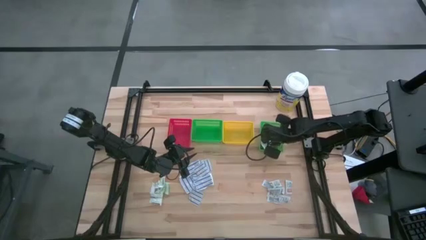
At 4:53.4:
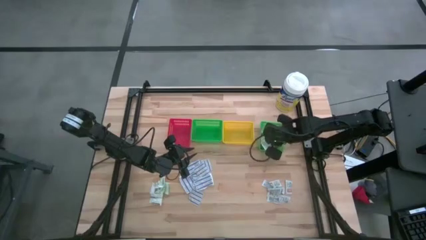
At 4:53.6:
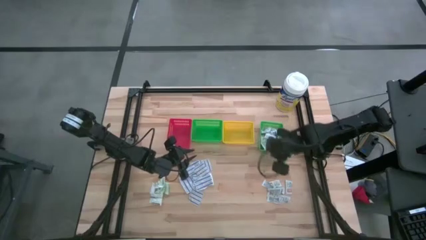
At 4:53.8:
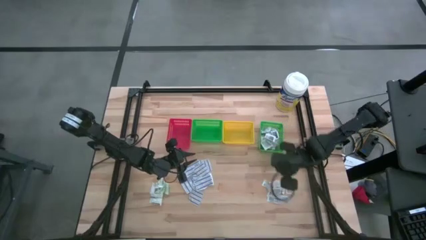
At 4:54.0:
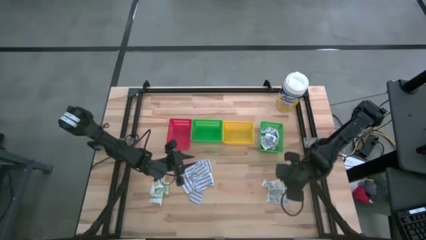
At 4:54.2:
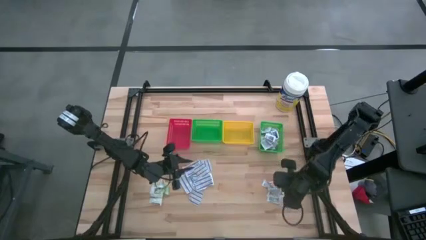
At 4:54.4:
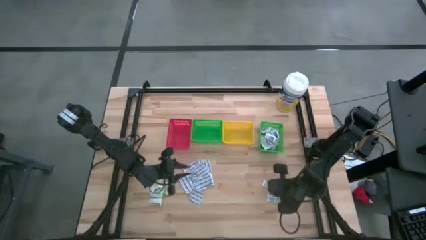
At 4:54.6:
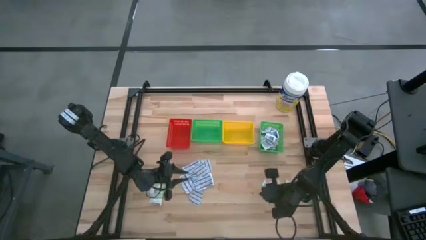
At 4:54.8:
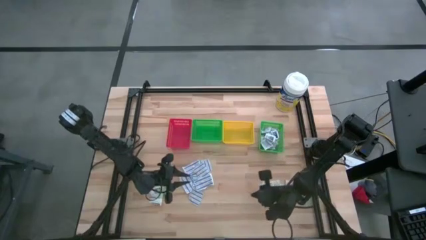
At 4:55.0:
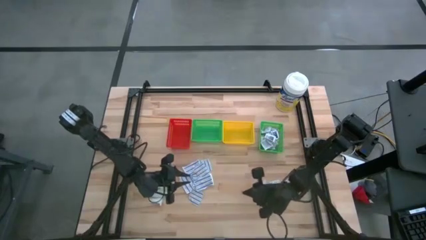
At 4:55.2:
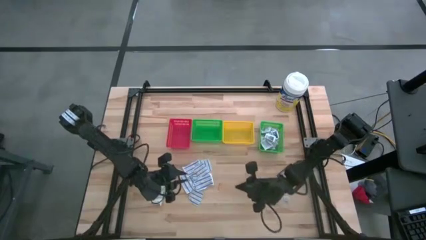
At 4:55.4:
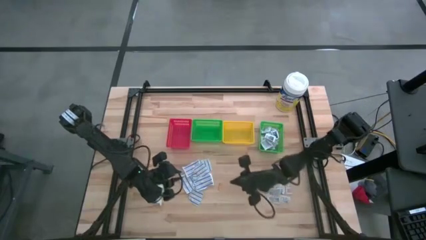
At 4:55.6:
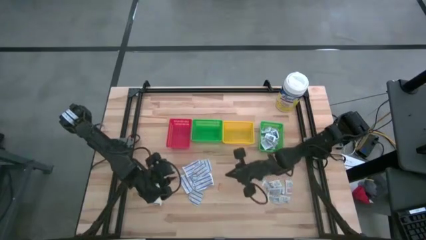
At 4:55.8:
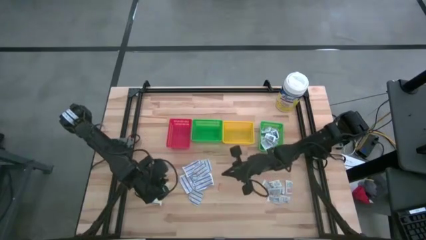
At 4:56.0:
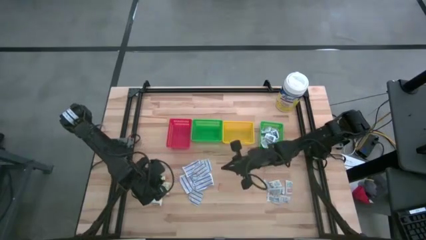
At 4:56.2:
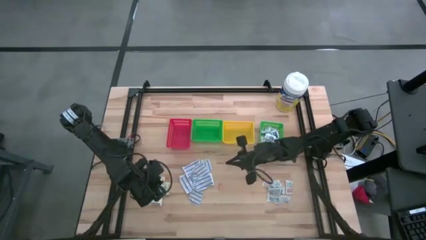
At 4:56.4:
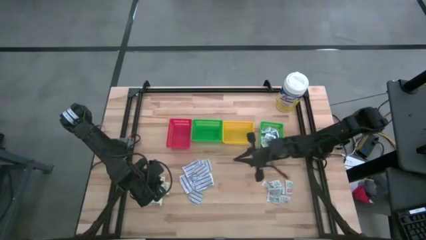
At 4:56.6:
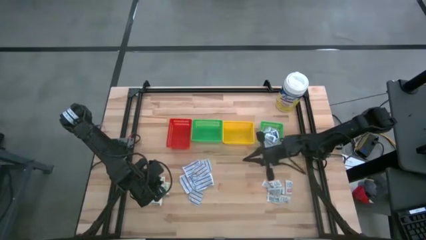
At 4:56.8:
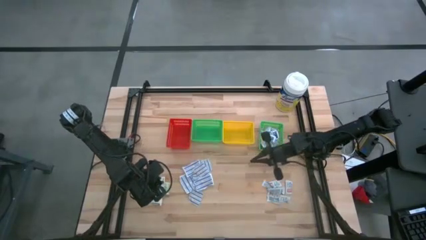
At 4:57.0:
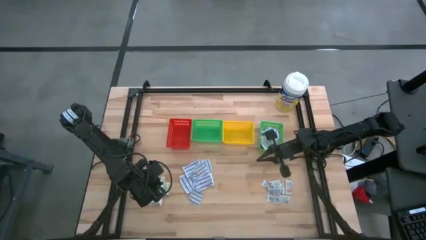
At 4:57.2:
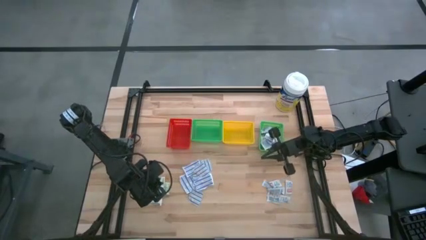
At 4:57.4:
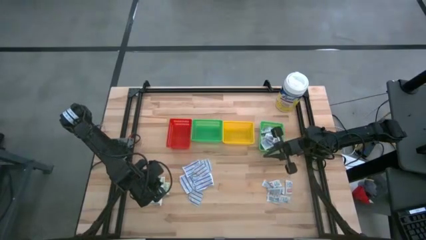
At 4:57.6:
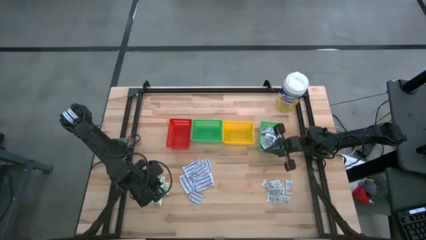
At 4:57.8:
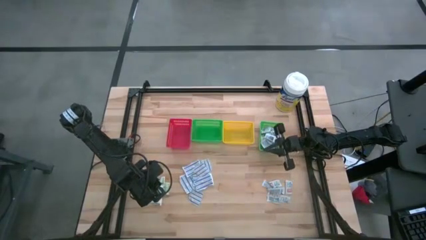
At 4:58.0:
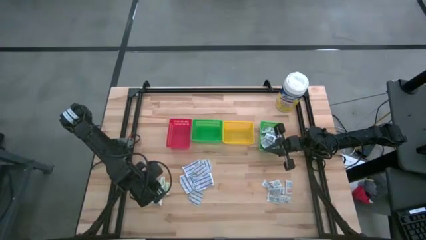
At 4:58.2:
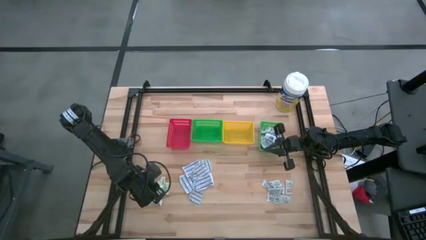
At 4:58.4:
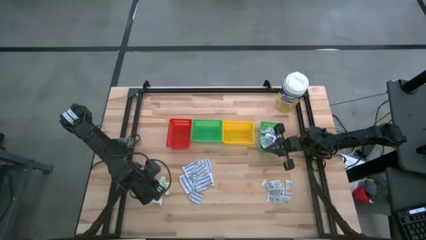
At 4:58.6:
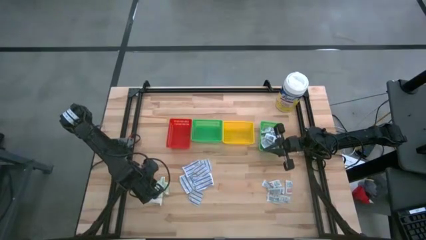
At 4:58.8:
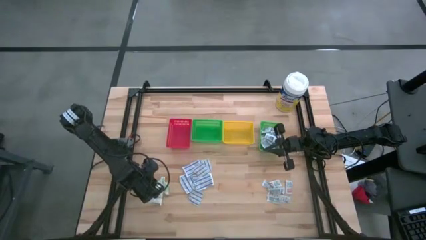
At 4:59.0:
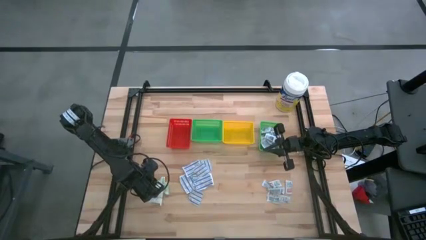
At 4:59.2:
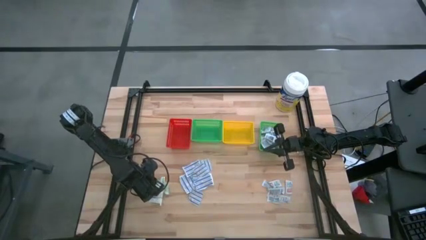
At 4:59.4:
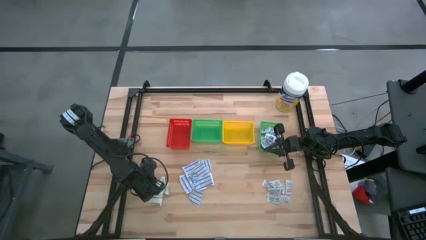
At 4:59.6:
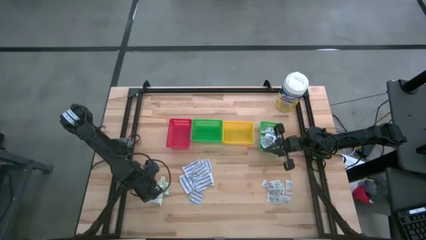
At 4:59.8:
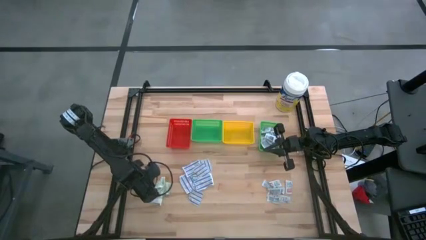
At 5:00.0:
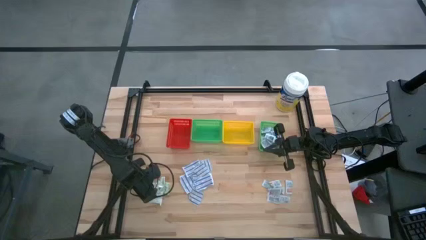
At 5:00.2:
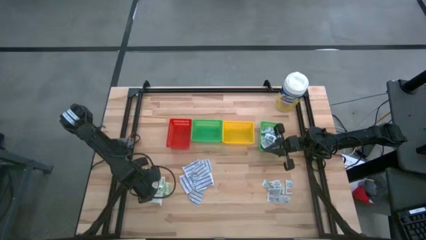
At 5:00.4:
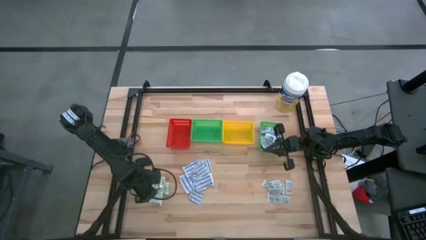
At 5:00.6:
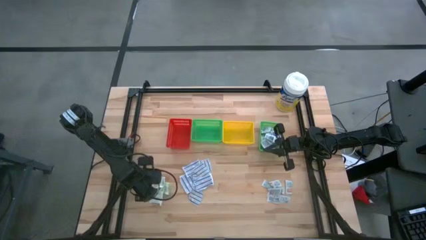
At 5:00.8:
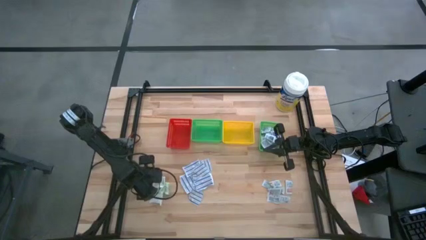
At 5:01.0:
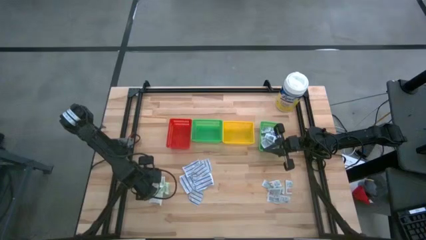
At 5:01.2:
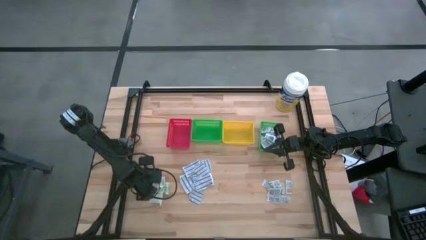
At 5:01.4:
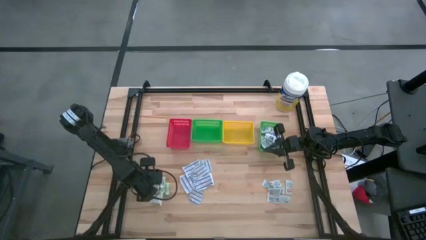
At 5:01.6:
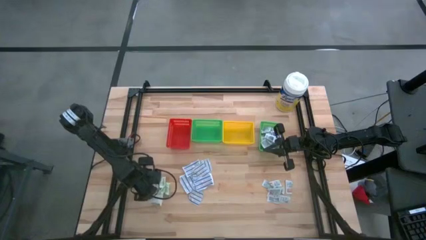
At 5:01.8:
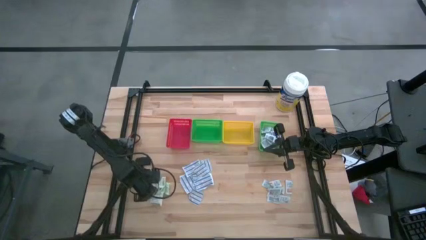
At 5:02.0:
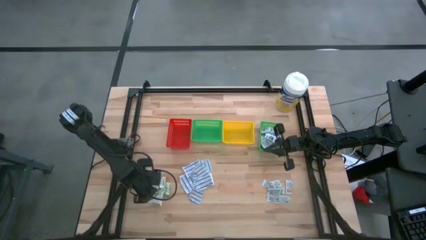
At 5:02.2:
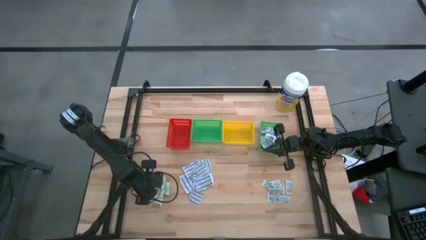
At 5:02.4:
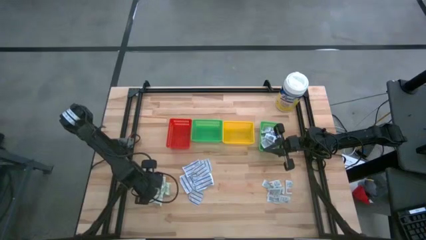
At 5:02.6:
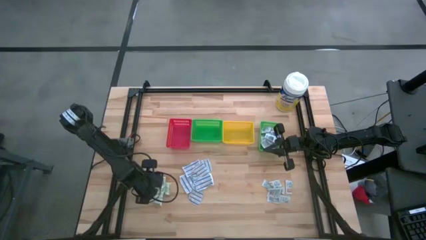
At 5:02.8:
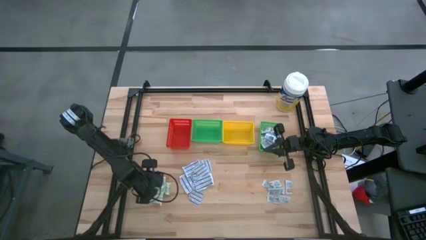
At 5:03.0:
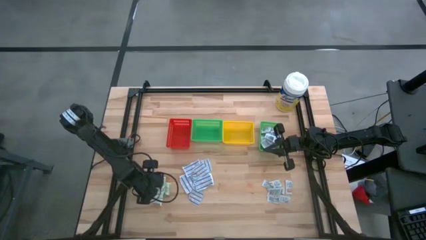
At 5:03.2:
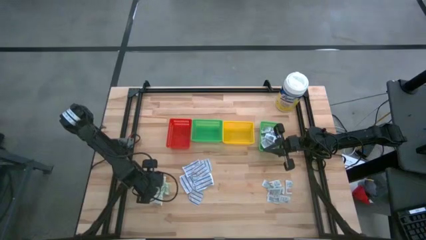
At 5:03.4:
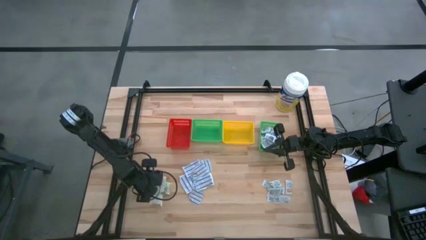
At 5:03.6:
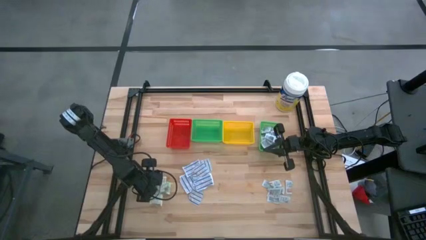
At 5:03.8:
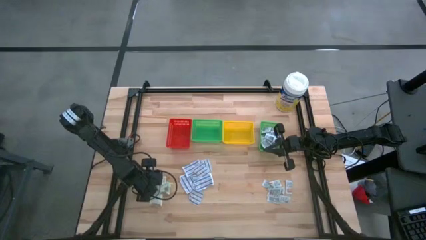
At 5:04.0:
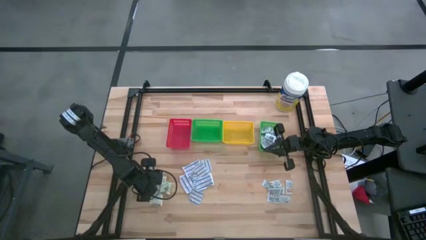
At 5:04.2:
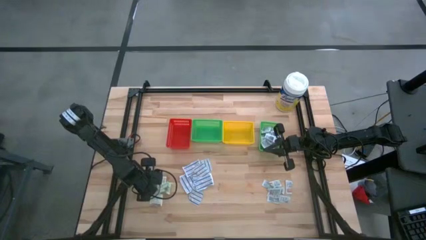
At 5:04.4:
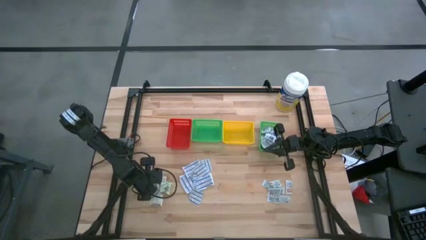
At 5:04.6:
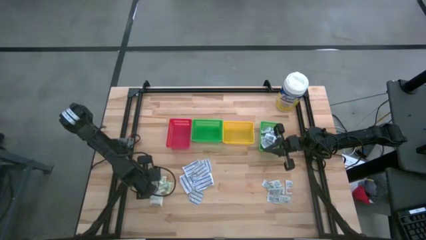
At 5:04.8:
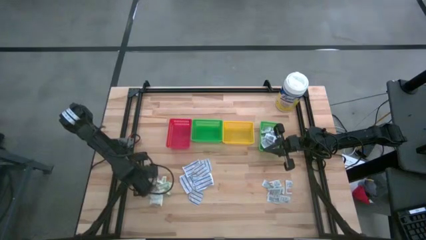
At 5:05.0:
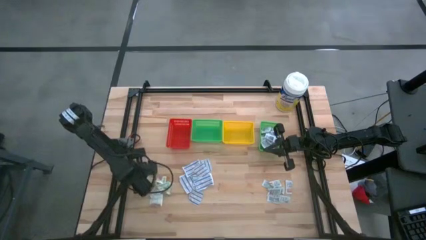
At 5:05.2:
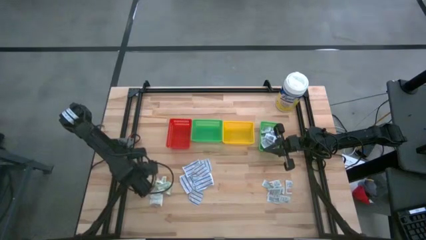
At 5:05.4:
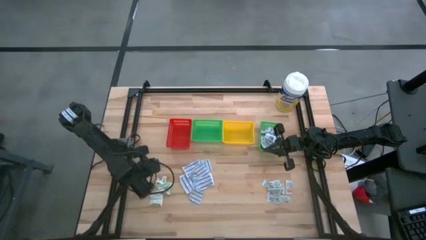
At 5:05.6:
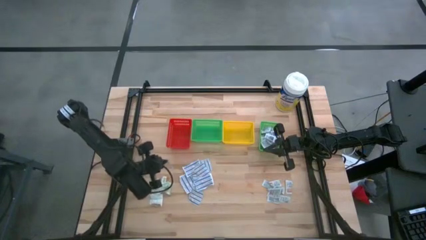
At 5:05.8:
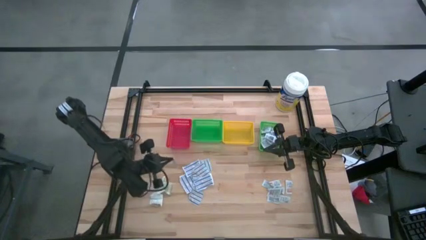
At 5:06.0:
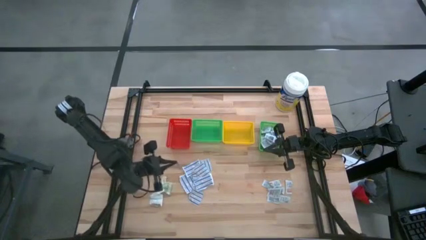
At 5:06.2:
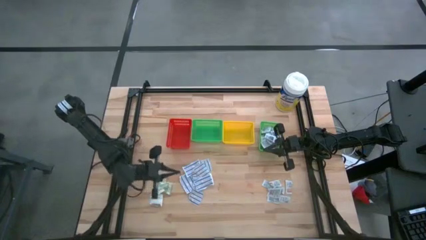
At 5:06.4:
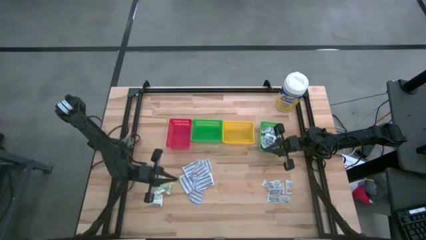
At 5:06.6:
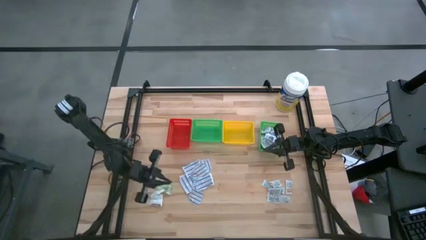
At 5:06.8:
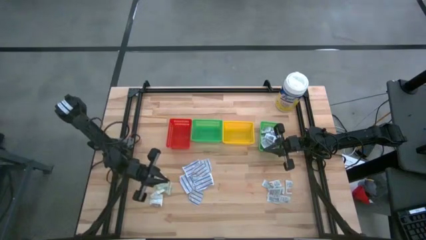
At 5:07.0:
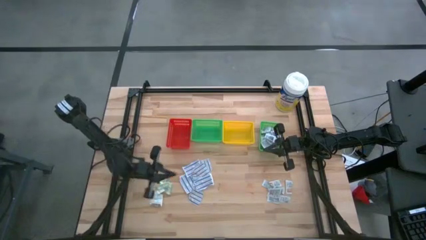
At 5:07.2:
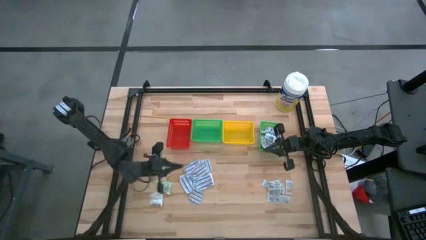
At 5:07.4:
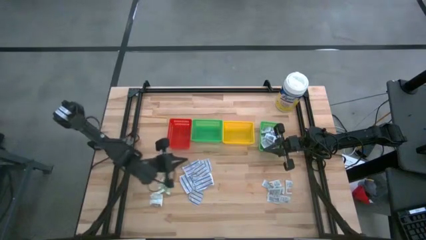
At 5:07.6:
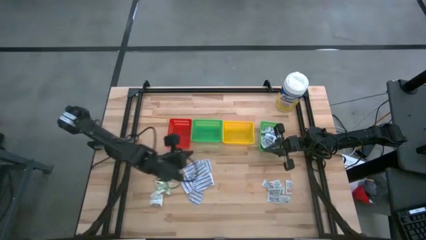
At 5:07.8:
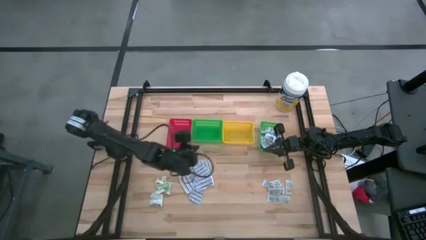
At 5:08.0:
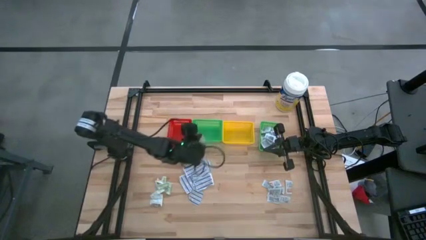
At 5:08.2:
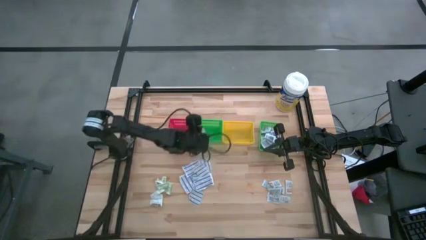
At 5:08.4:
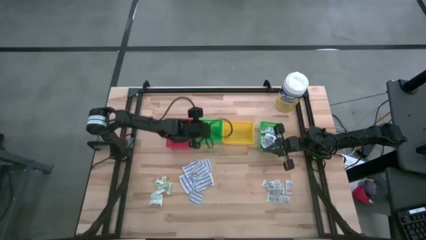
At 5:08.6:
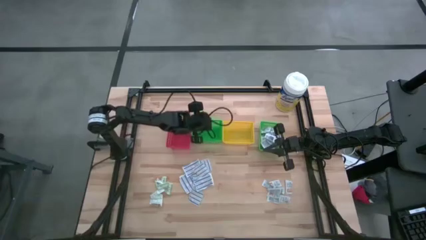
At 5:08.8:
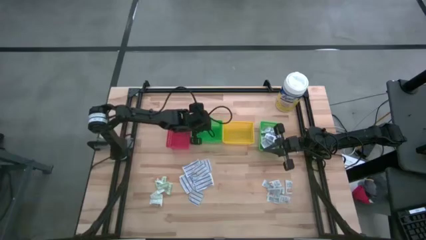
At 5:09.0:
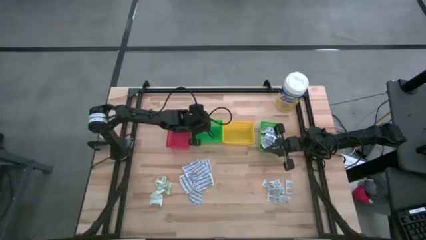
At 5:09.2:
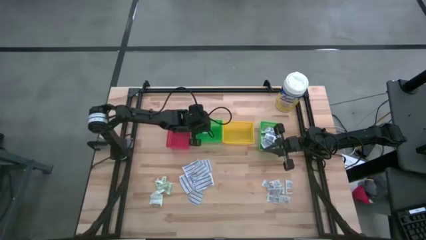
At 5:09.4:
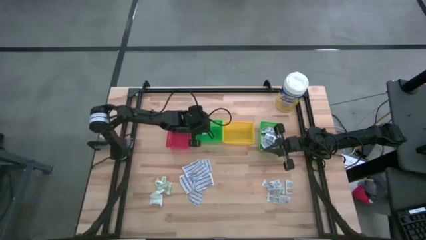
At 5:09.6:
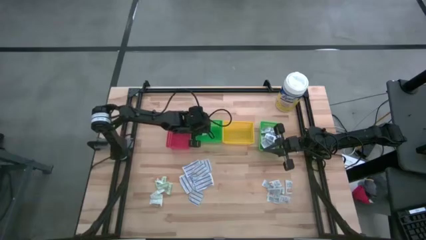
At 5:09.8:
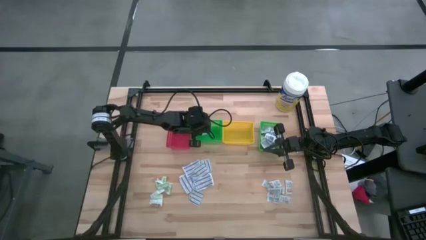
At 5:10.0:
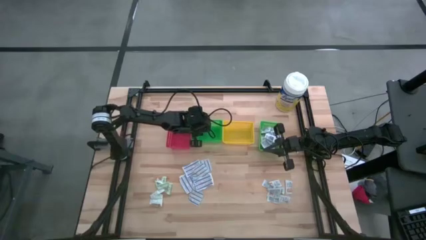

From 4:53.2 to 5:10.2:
Task: Pick & Place First Aid Supplies
Put the green bandage into the left green bin
